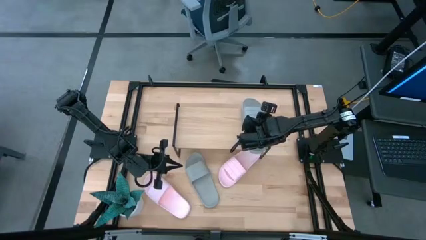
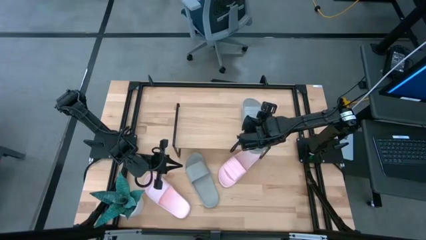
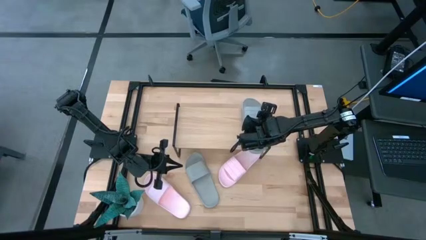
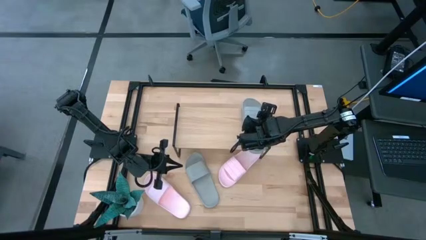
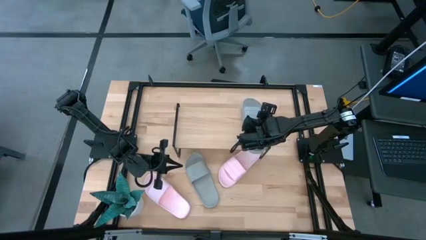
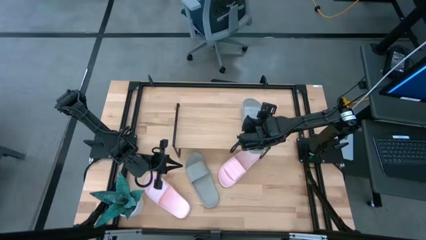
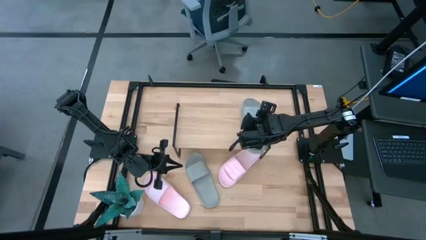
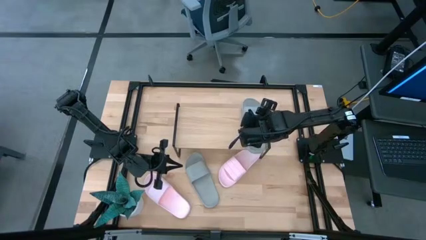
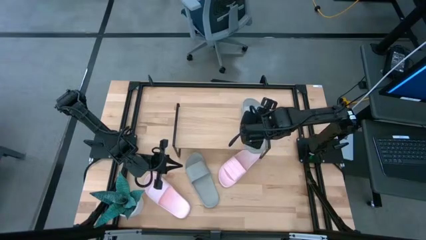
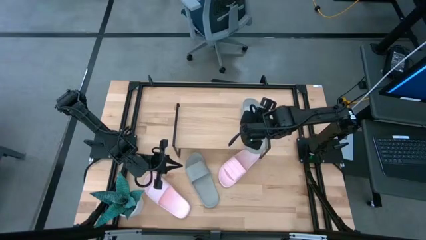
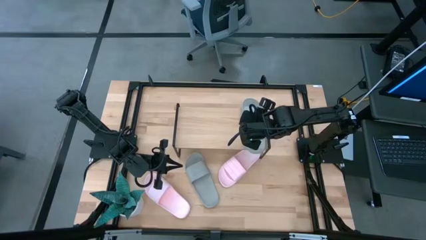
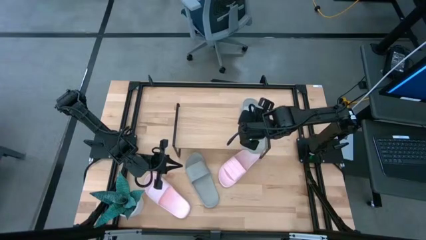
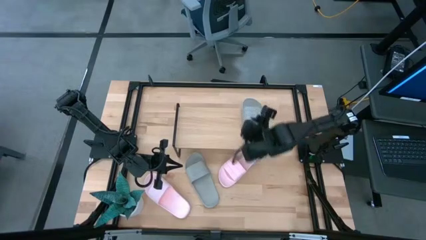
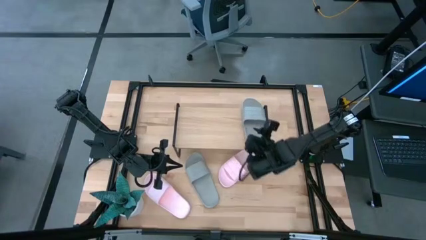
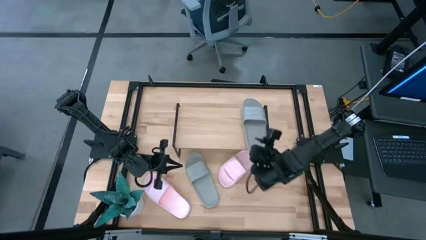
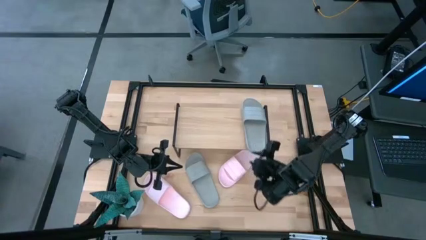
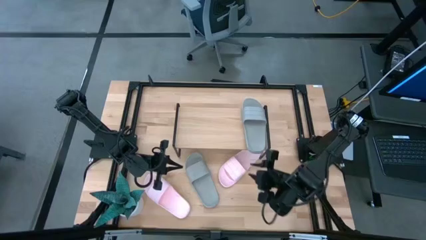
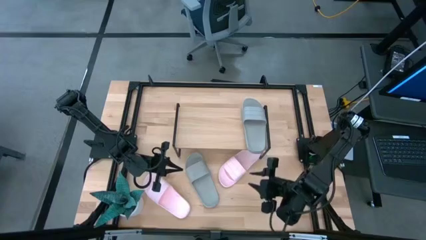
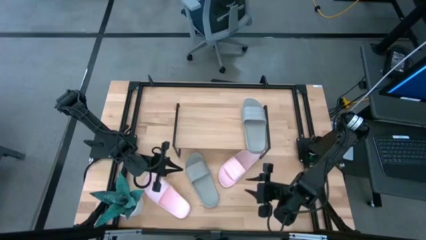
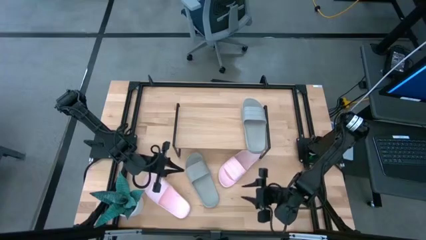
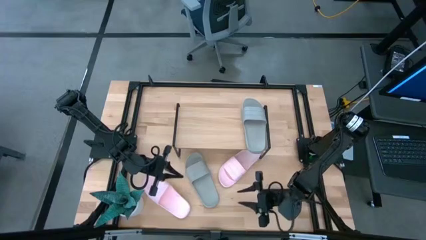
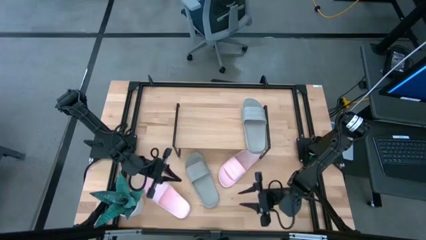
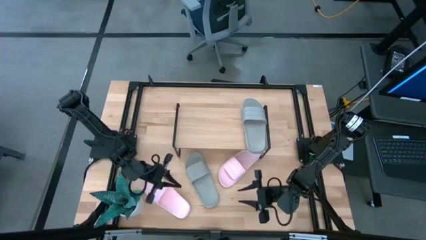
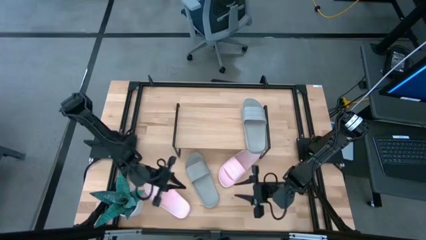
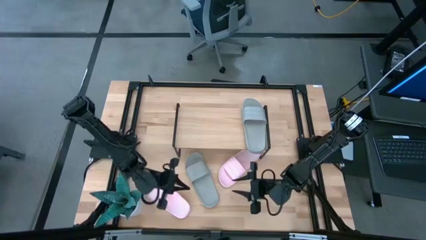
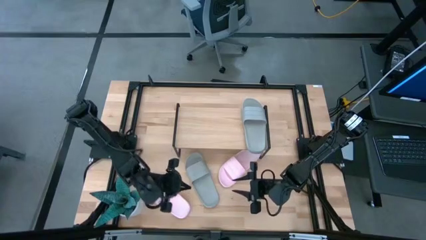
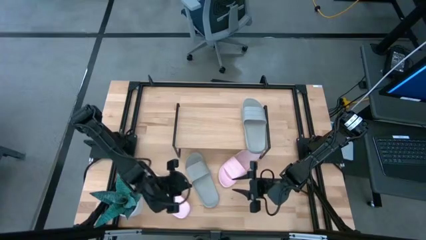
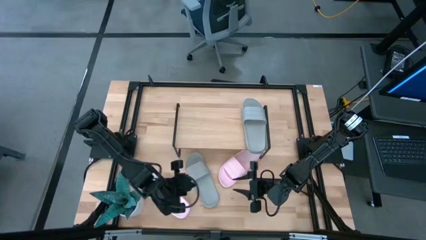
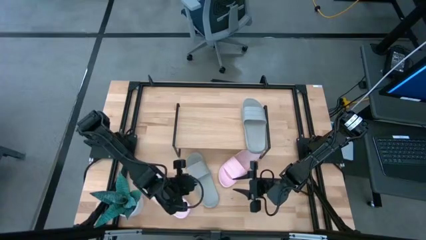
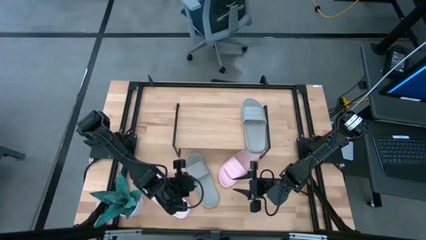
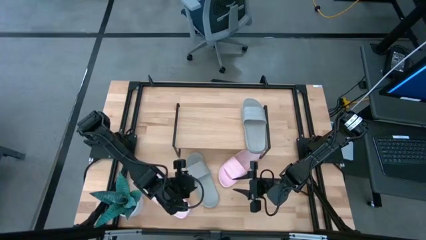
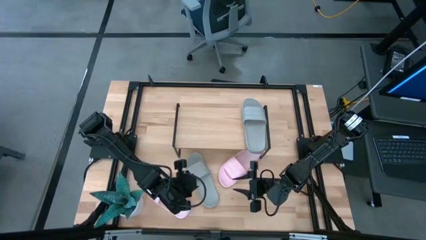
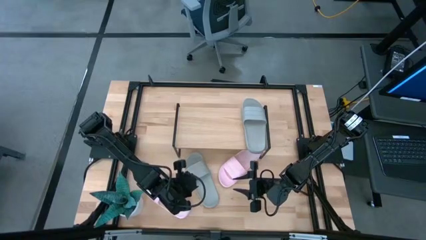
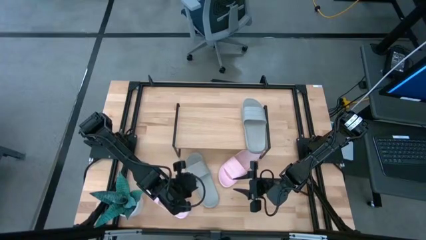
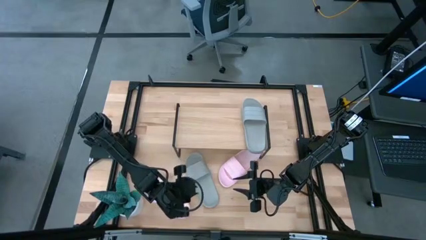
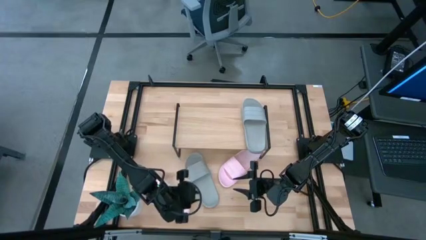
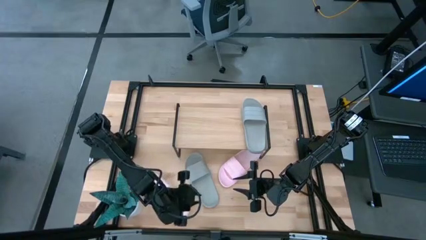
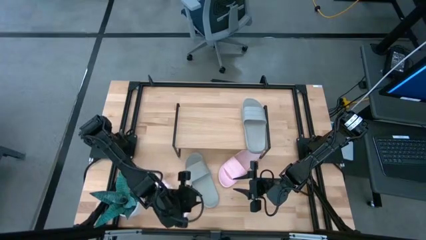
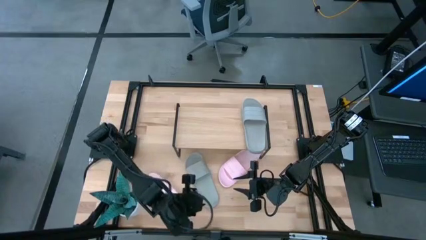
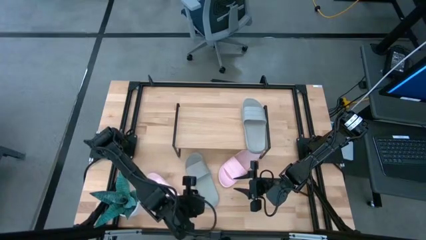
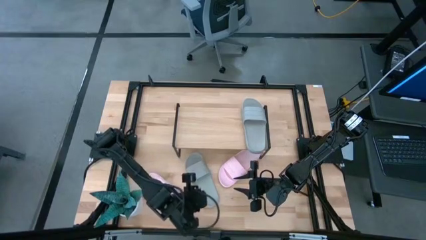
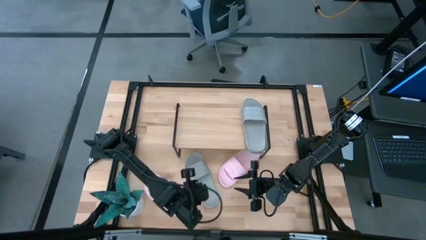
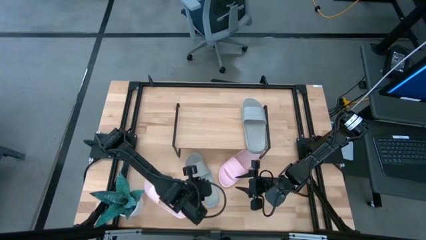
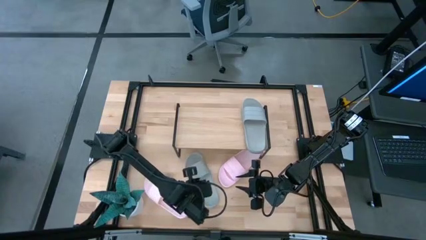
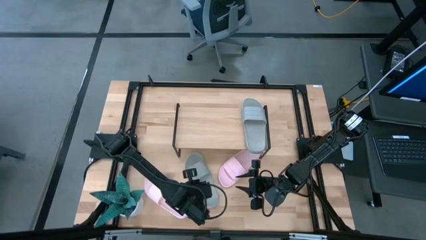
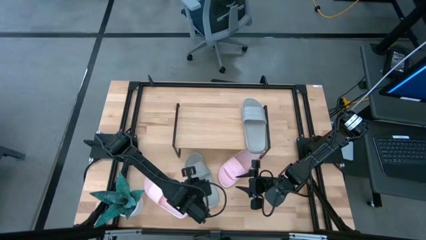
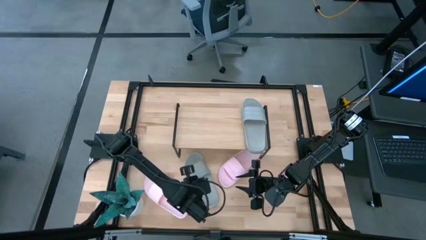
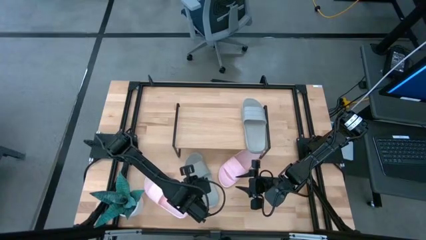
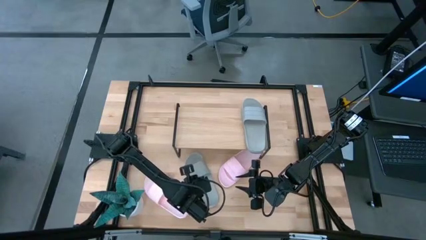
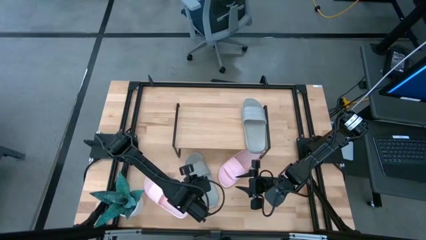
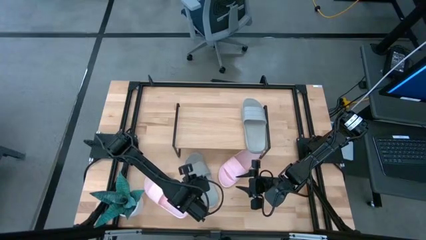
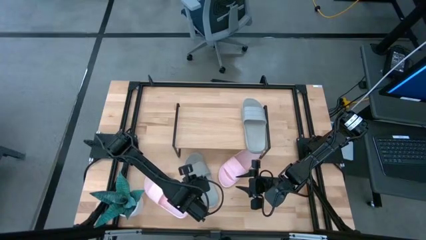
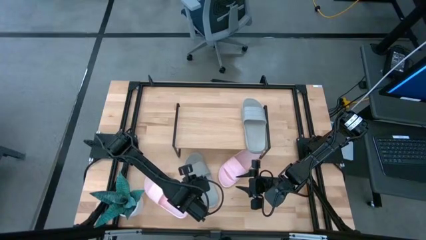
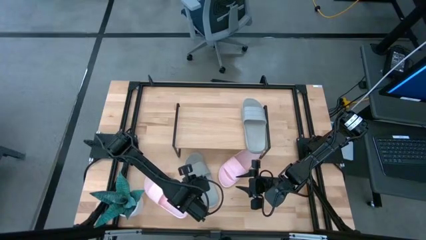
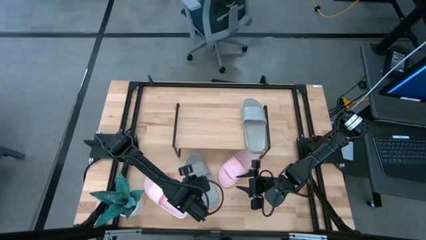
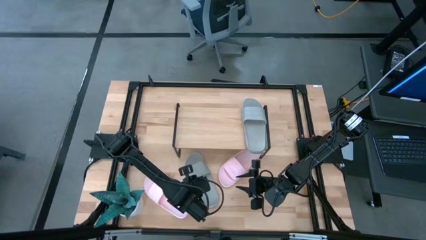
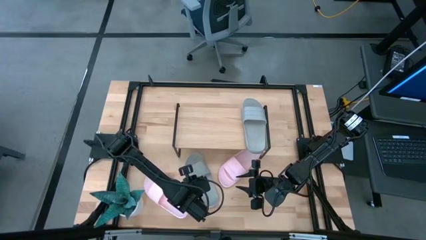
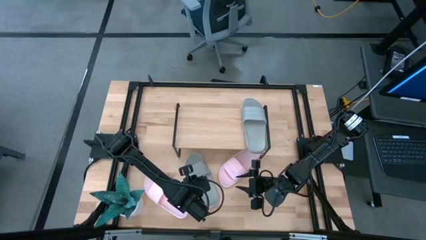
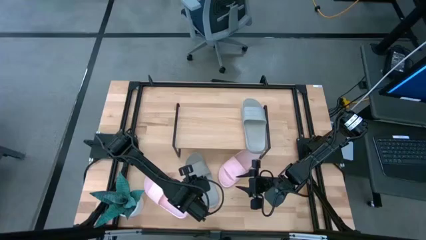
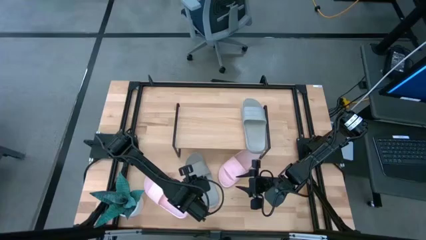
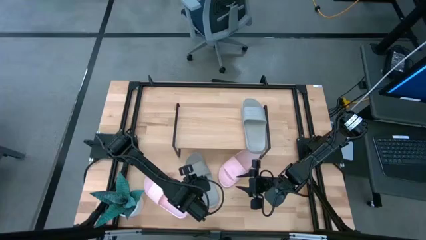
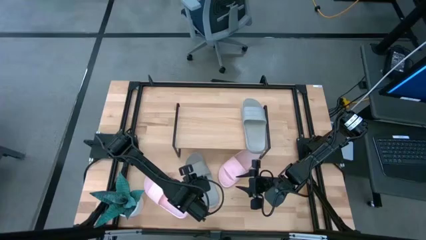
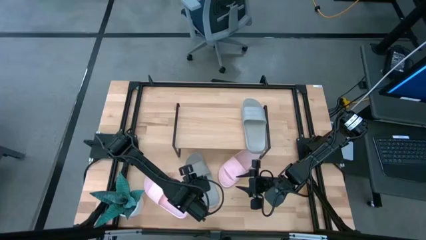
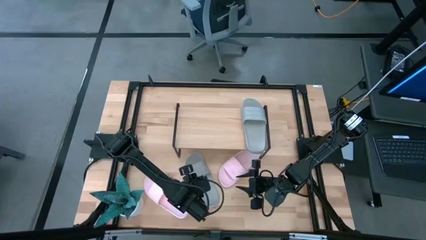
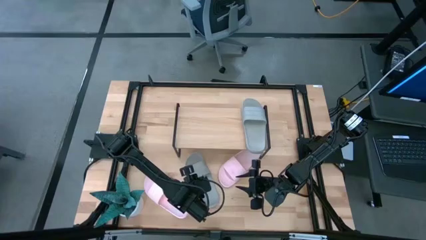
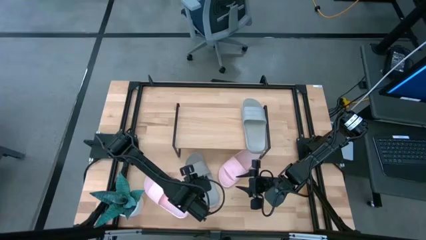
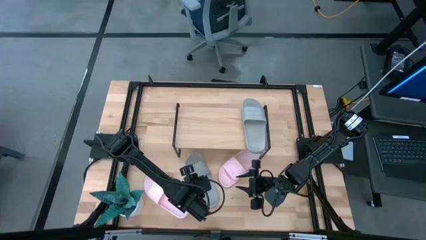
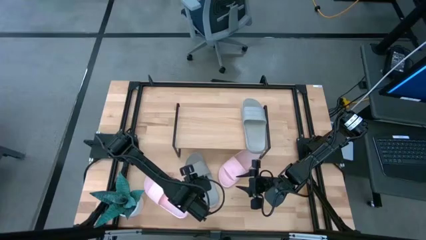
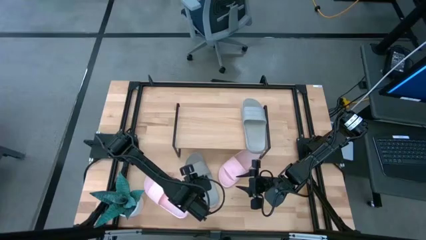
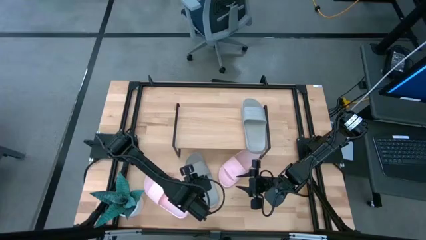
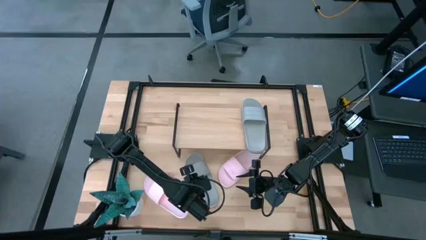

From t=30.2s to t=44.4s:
Task: Pick and place slides into the shelf
Put the gray slide on the shelf

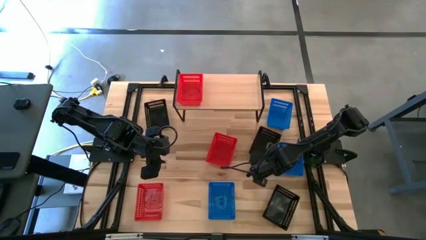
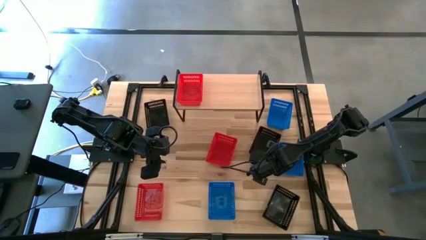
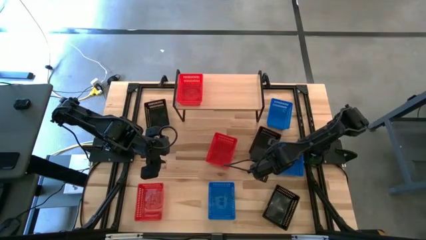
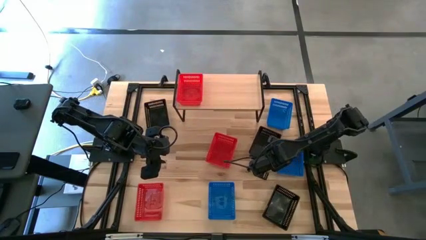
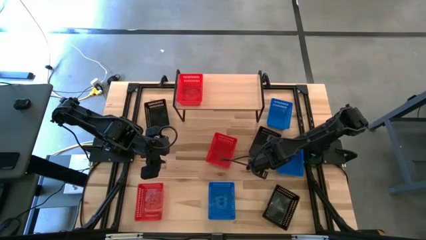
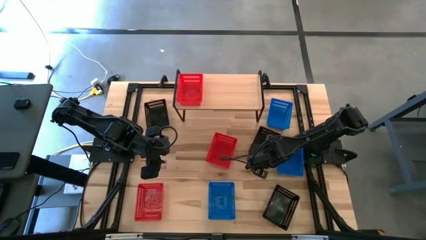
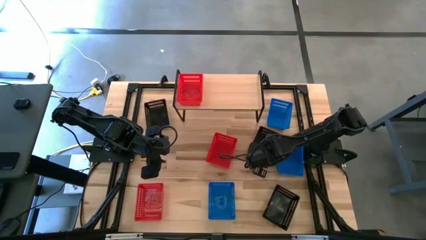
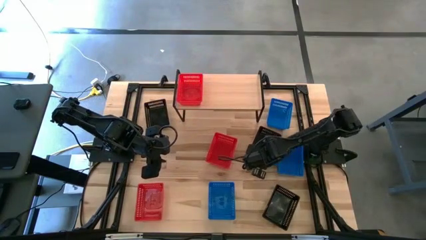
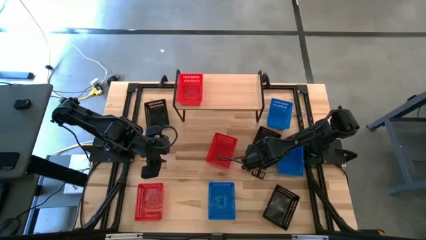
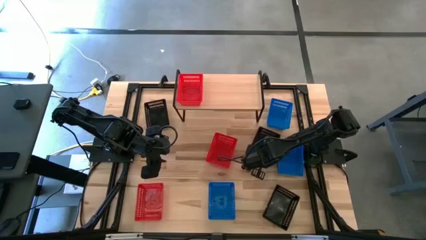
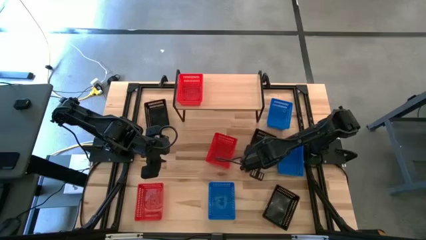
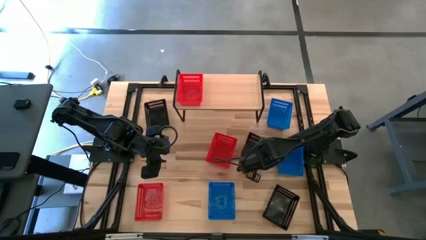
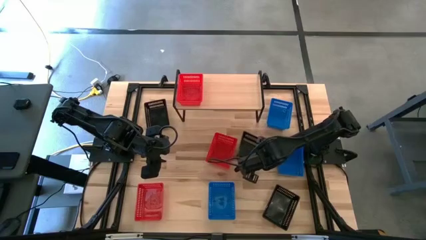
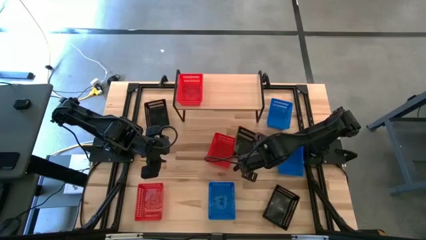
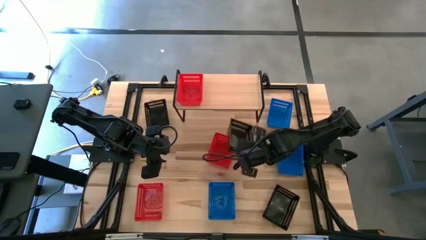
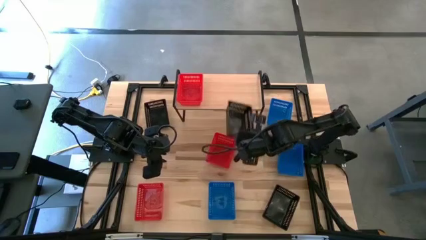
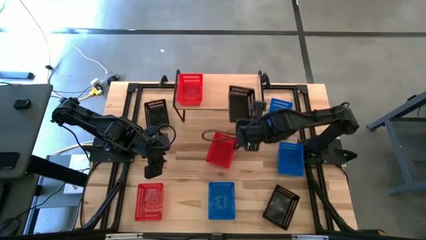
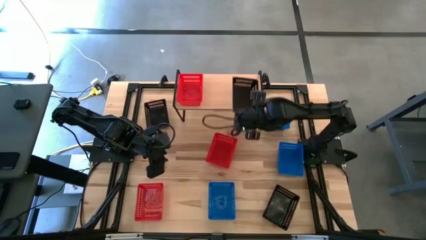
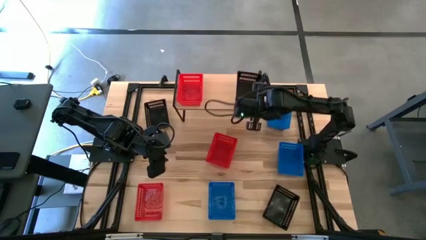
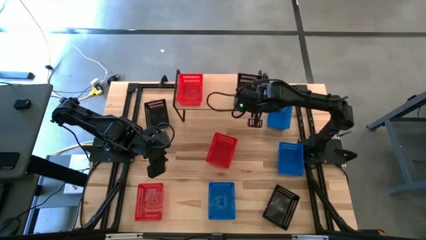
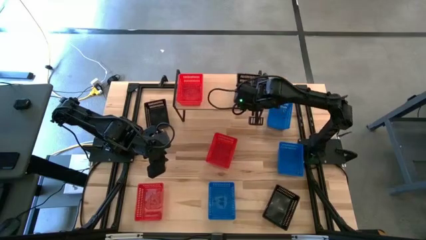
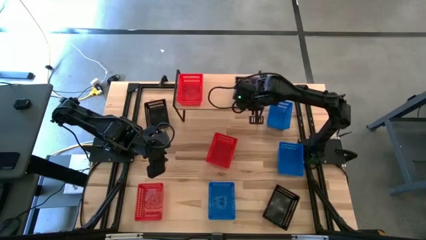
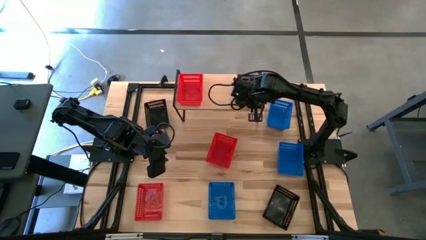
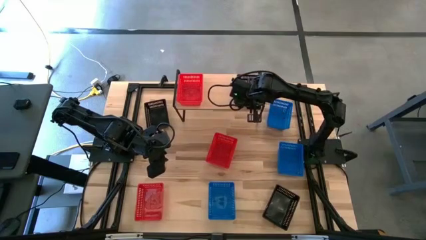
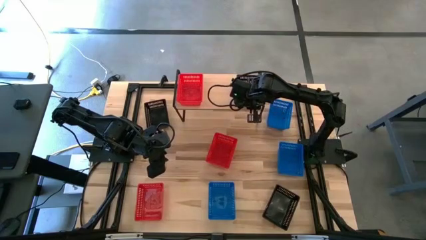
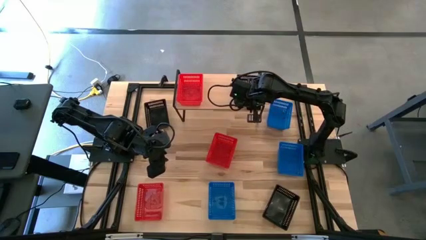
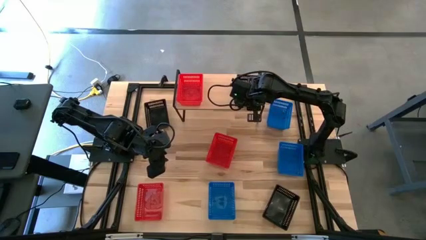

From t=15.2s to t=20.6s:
Task: Stack baskets on shelf by color
Put the top right black basket on the shelf
